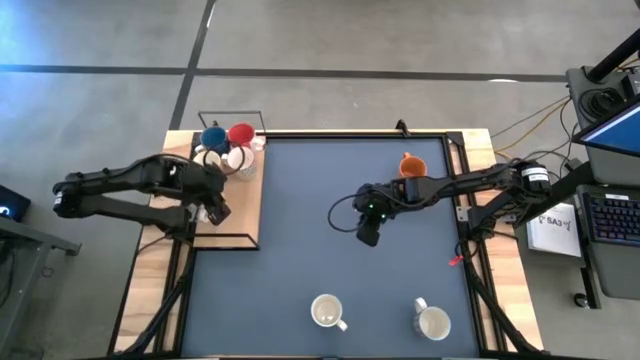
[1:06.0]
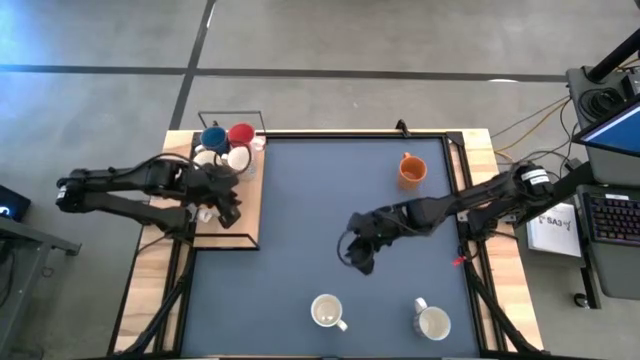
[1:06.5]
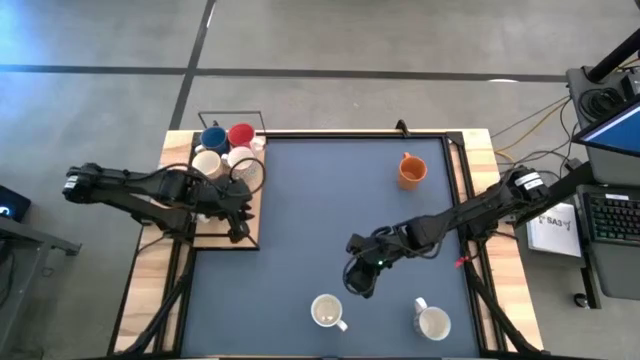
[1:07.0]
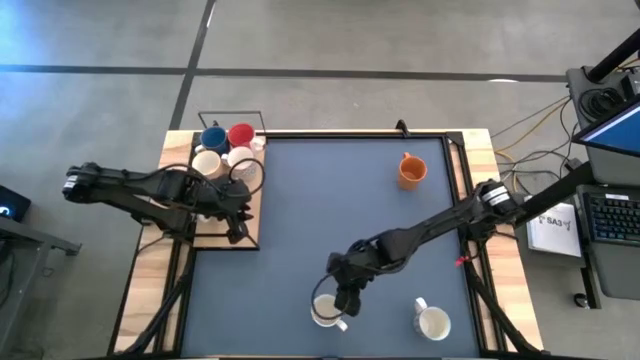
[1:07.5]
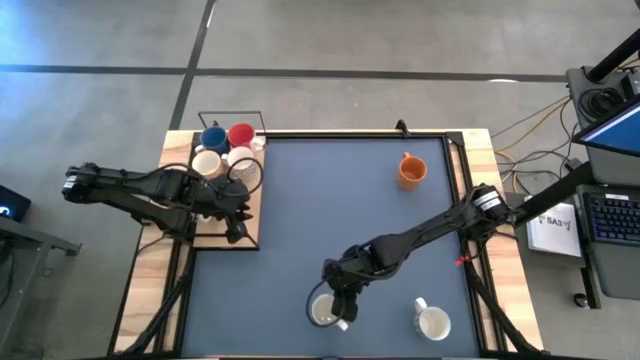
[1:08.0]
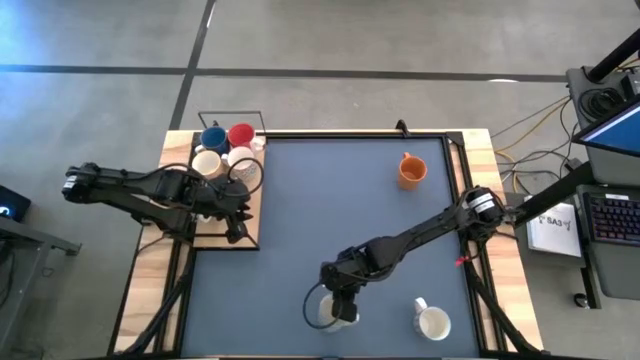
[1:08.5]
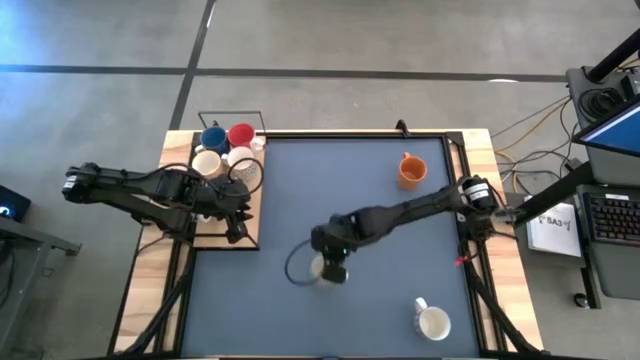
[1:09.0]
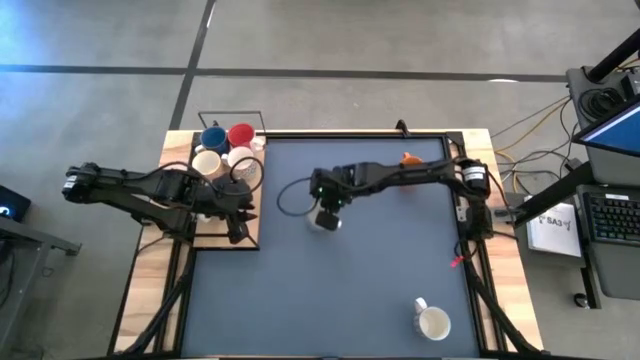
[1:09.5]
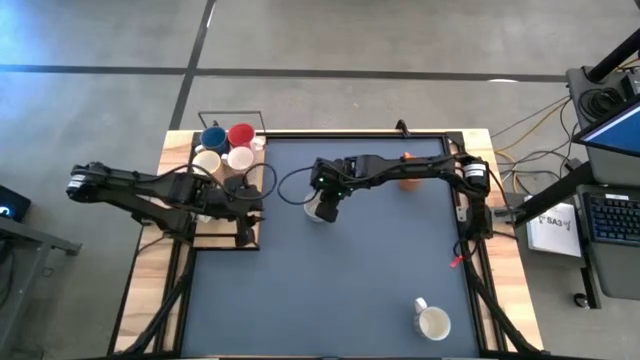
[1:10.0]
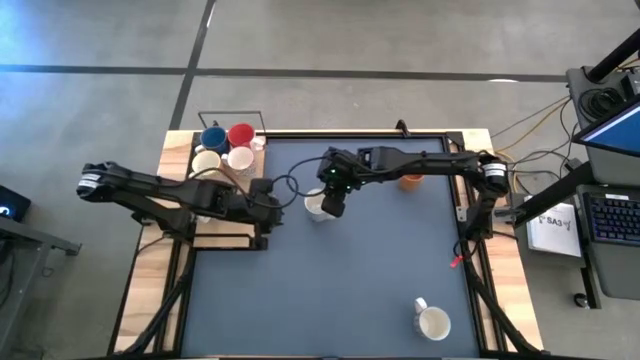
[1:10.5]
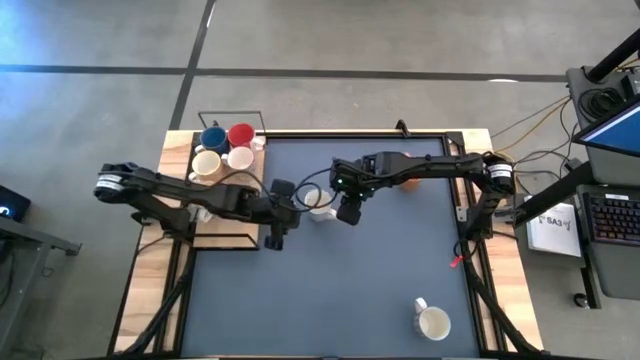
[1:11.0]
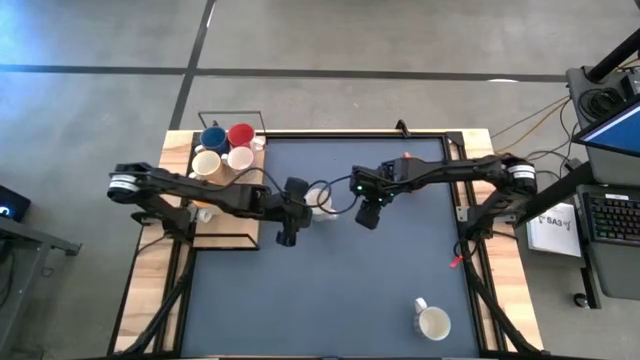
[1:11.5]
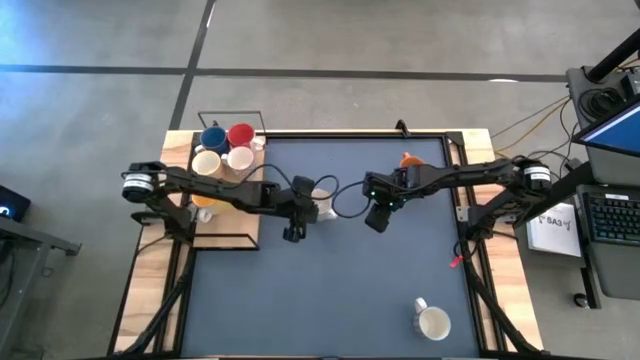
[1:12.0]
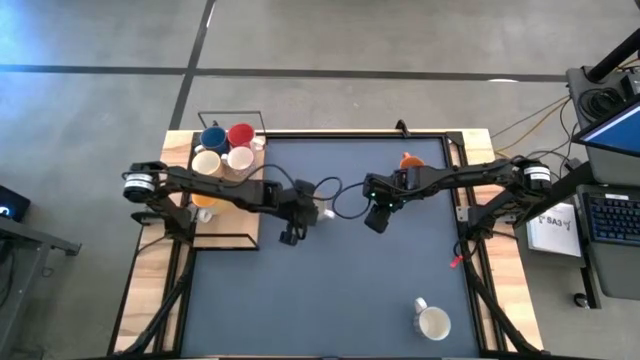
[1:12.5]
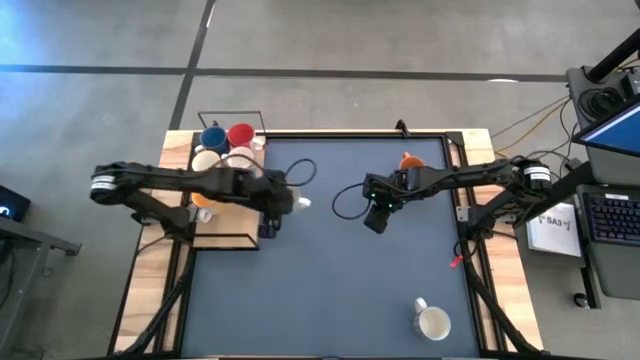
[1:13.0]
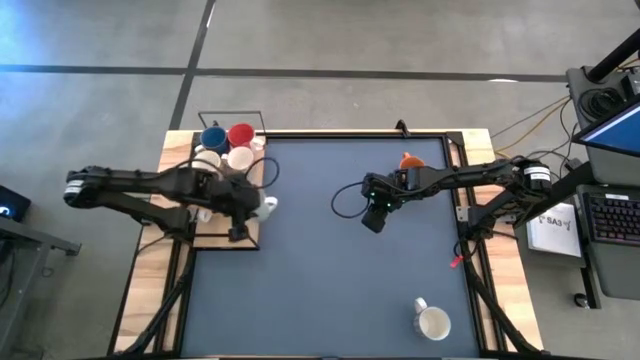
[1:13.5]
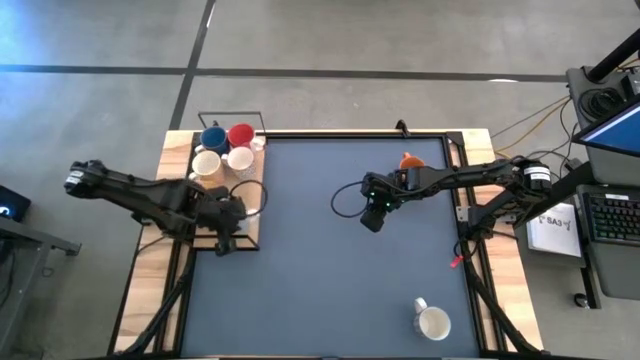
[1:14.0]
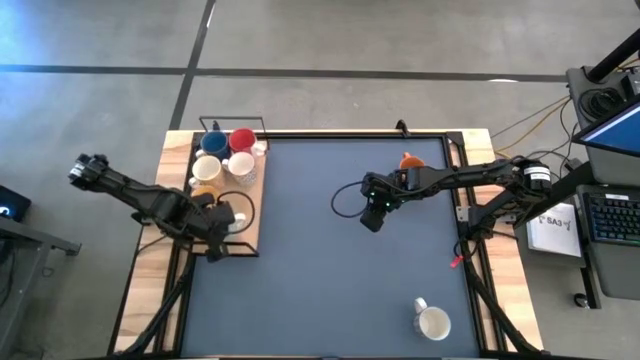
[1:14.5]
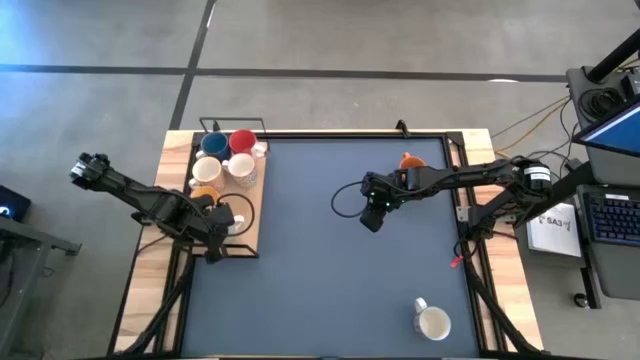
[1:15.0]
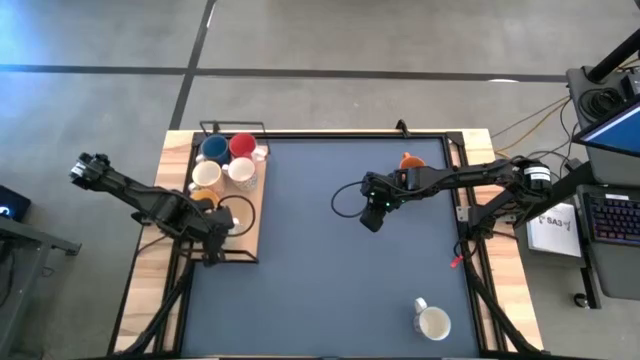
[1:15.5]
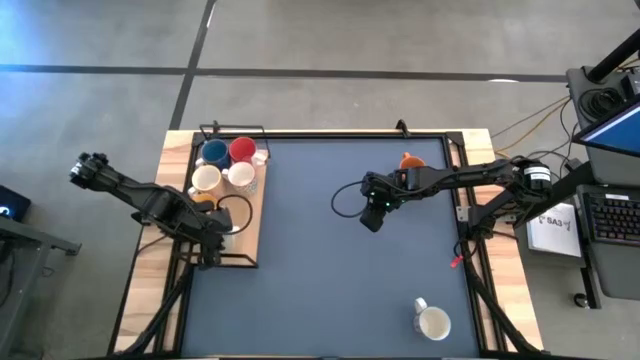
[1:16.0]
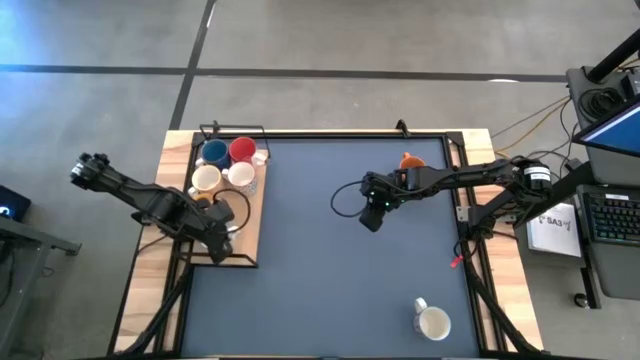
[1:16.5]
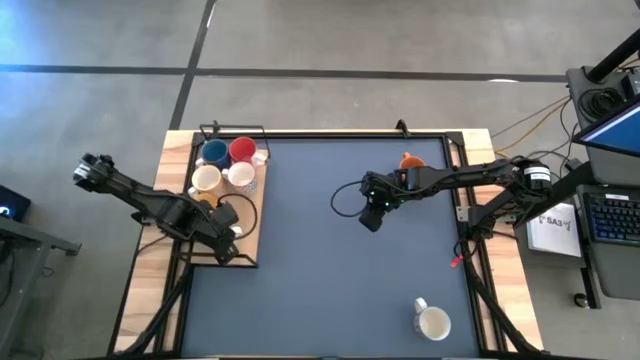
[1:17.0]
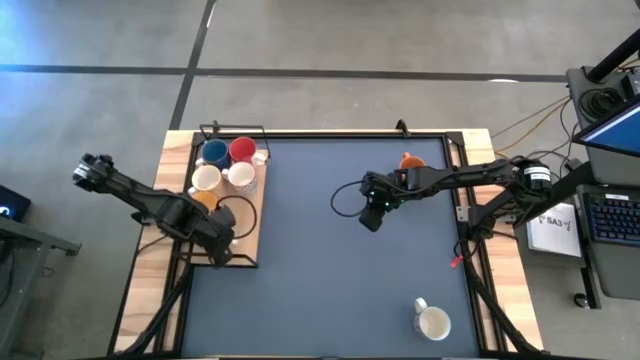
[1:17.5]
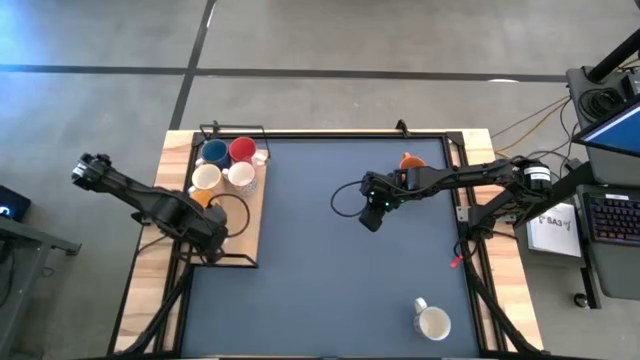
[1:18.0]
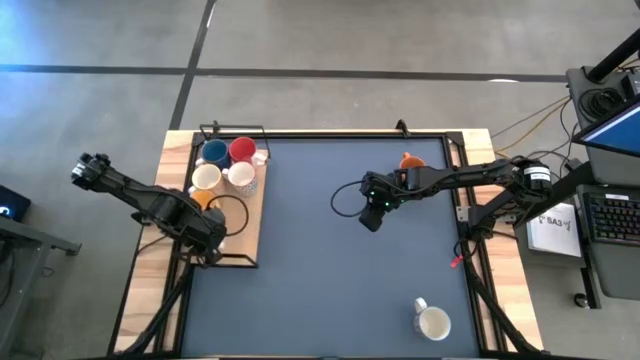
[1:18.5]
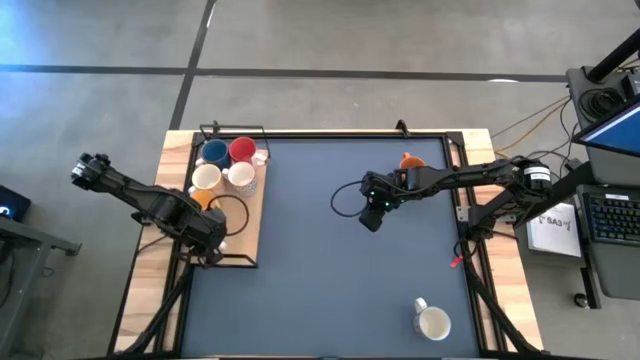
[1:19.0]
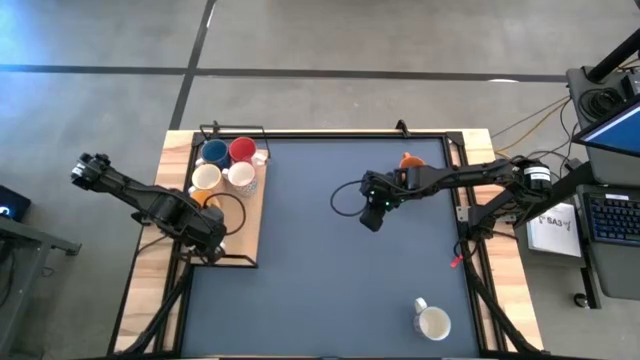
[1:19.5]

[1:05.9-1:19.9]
Task: Place coffee mugs
Put the green patterned mug on the shelf

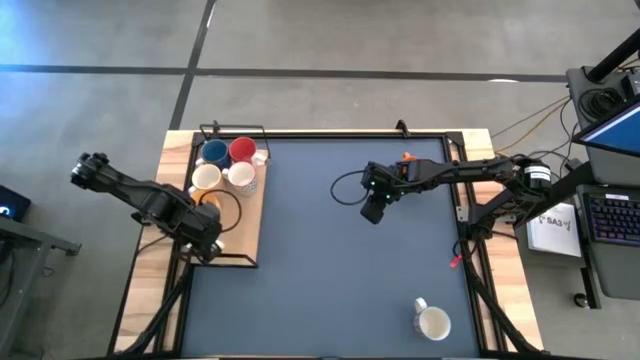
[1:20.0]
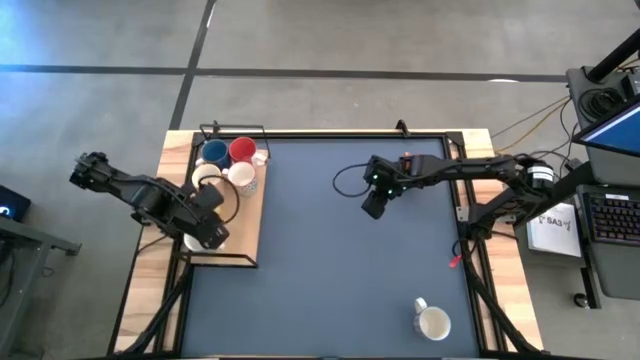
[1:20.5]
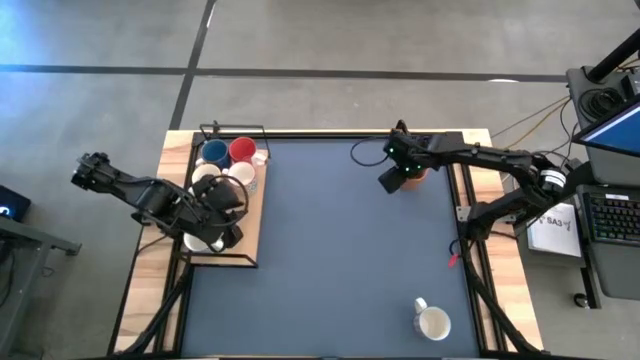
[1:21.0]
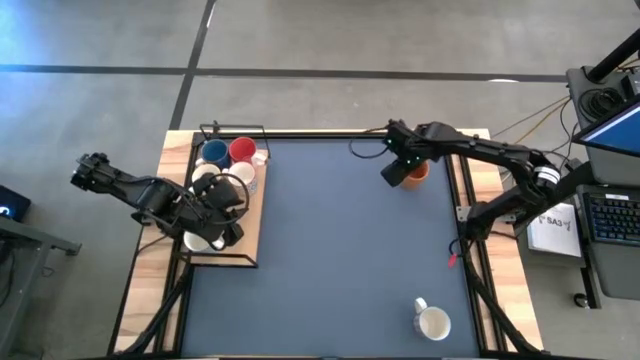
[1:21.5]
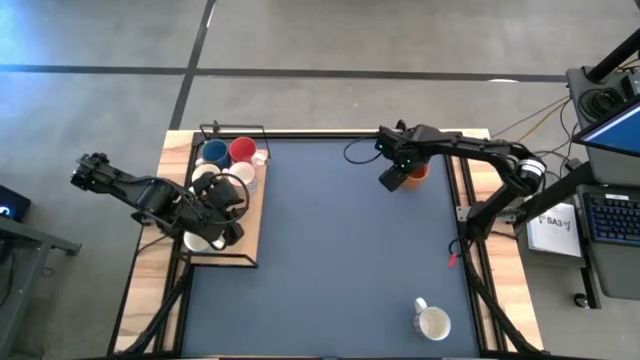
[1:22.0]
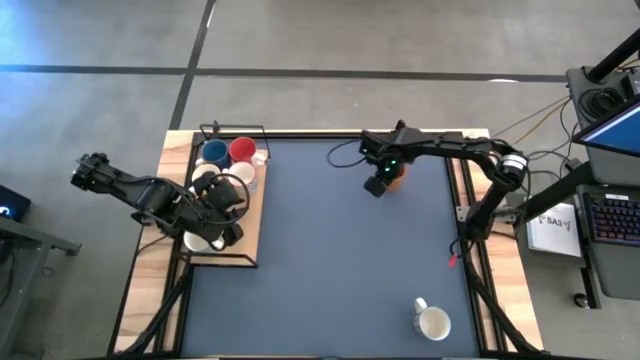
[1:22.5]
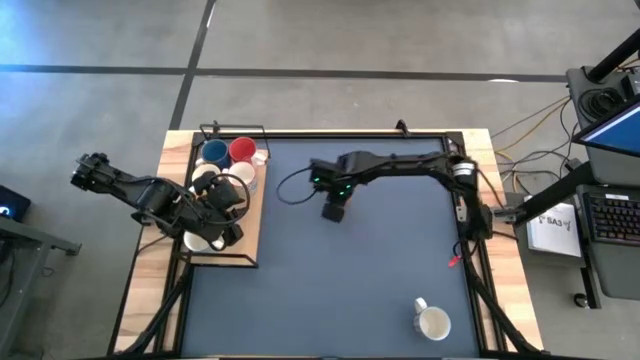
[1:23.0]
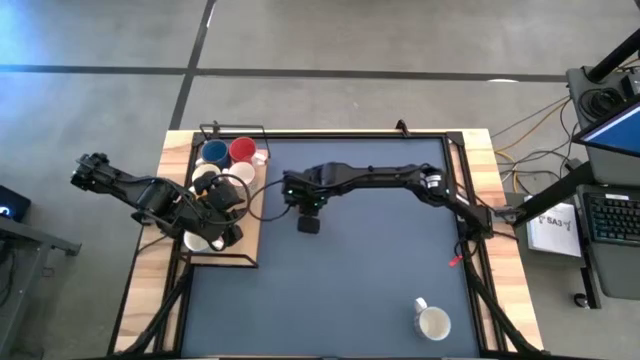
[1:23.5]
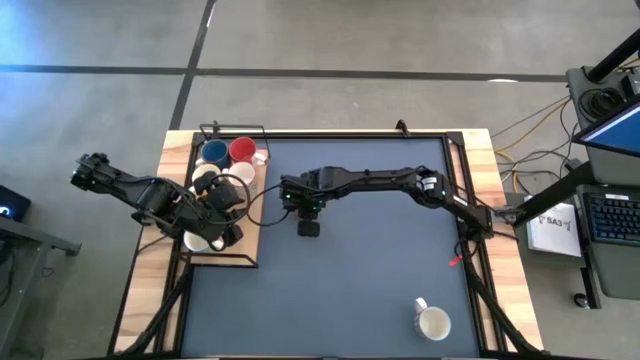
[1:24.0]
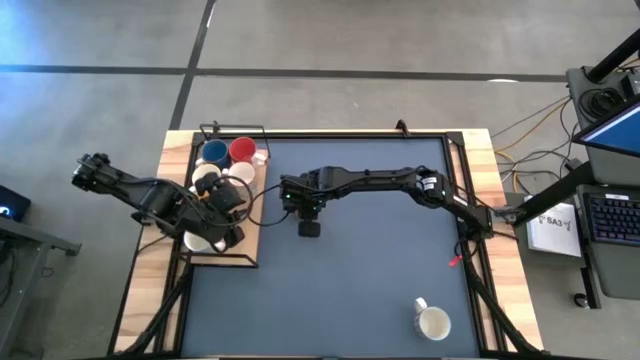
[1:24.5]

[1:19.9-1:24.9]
Move the orange patterned mug to the left center of the table

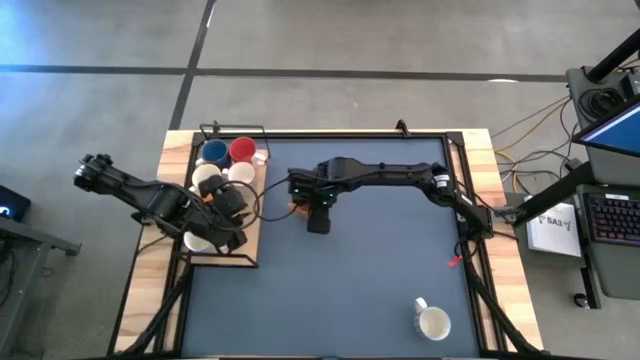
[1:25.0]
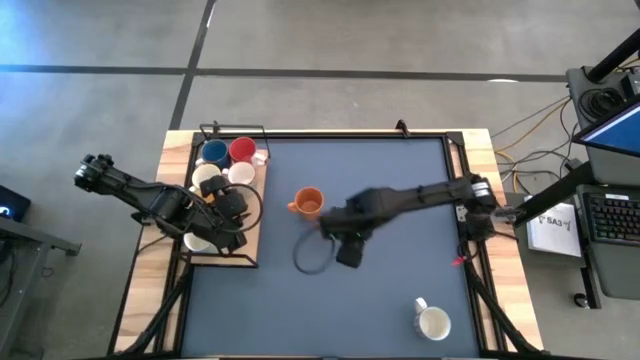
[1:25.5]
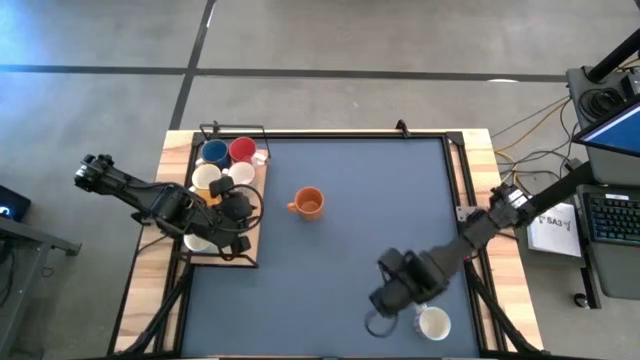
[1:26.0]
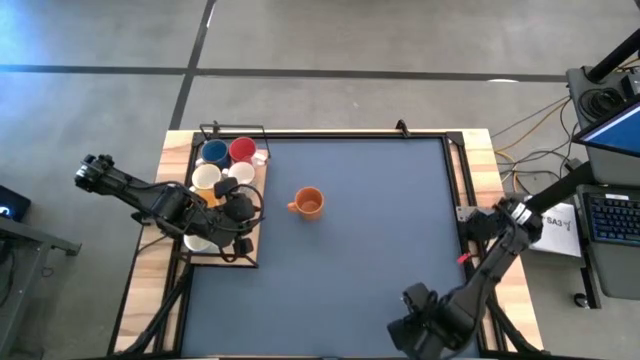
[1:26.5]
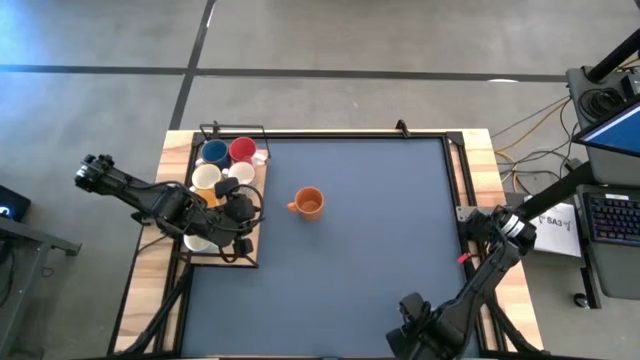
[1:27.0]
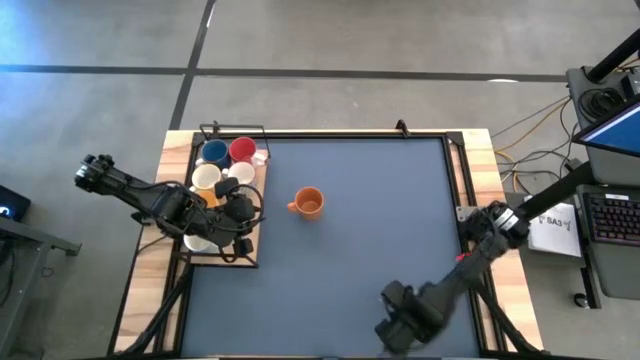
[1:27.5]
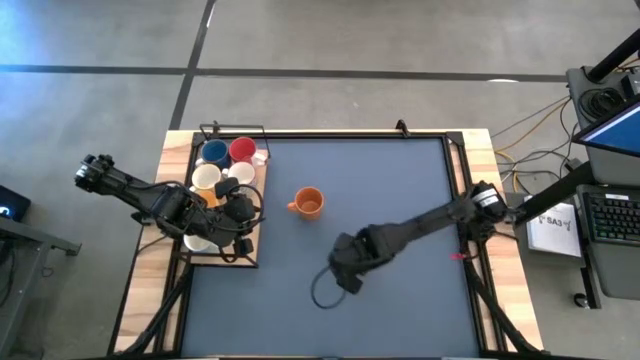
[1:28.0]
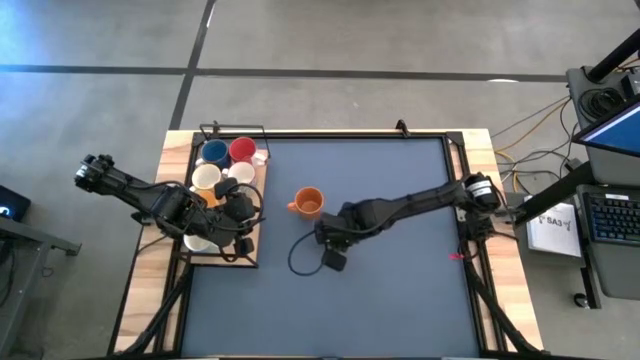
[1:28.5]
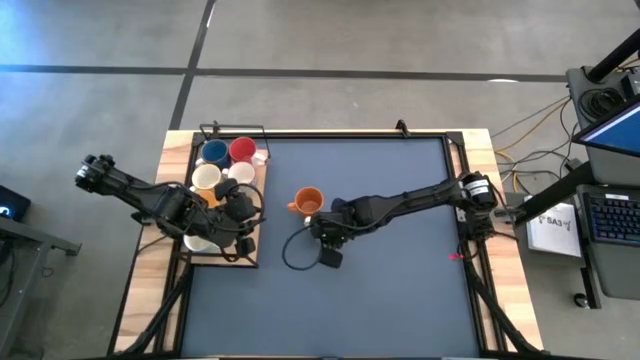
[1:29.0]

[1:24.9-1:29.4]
Move the red patterned mug to the left center of the table
